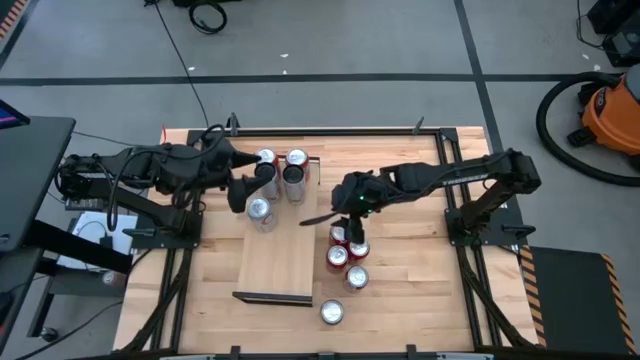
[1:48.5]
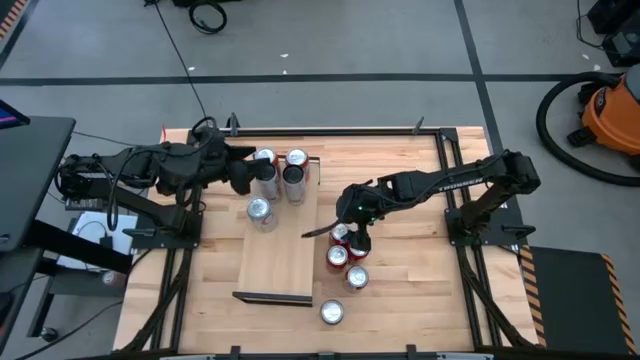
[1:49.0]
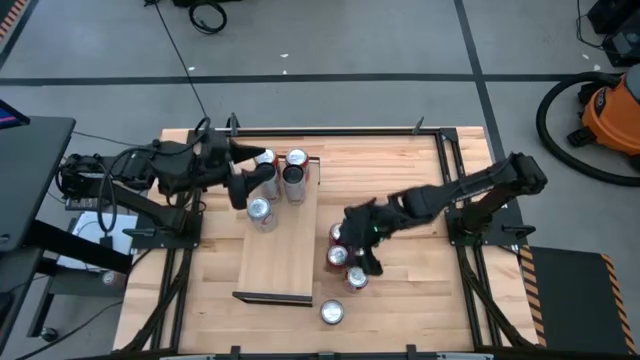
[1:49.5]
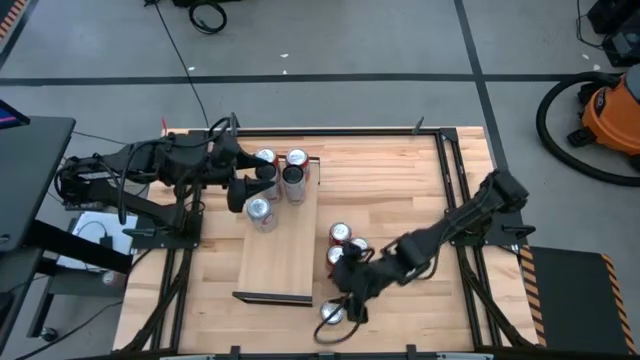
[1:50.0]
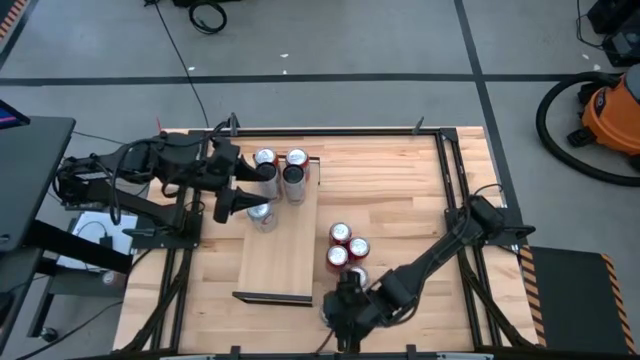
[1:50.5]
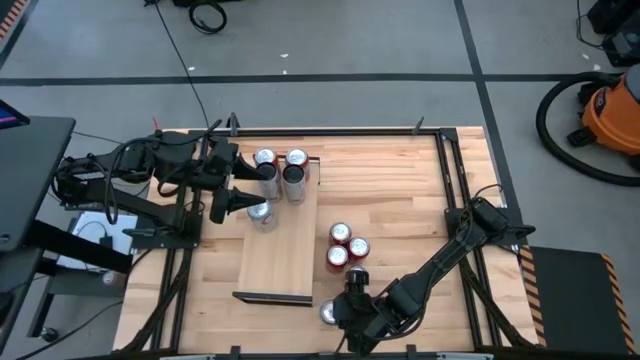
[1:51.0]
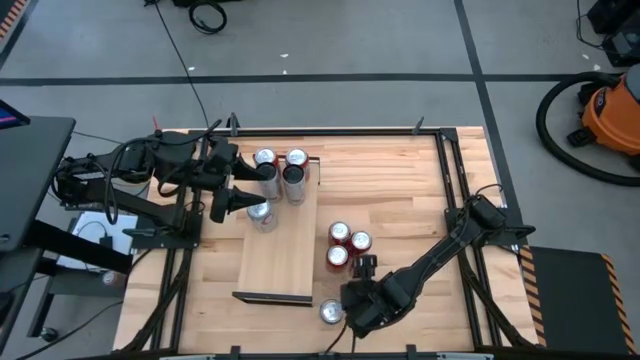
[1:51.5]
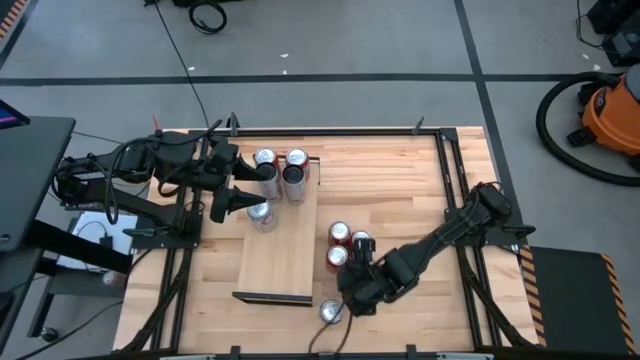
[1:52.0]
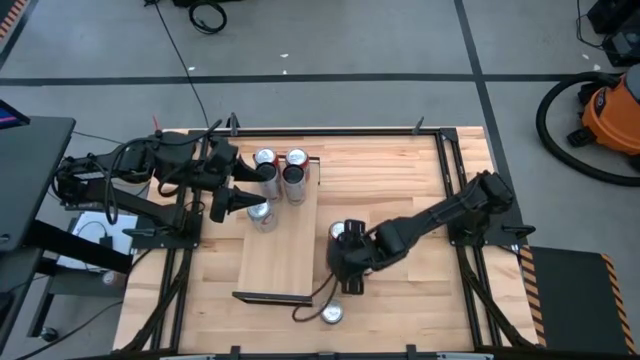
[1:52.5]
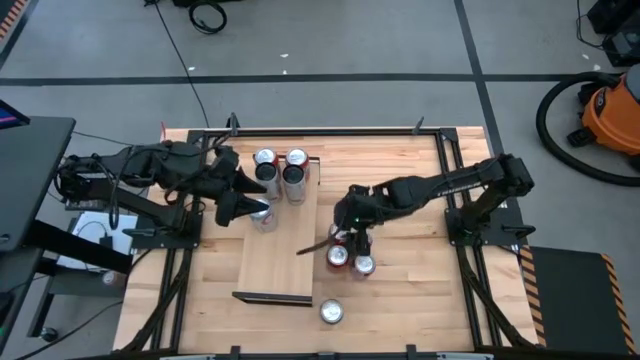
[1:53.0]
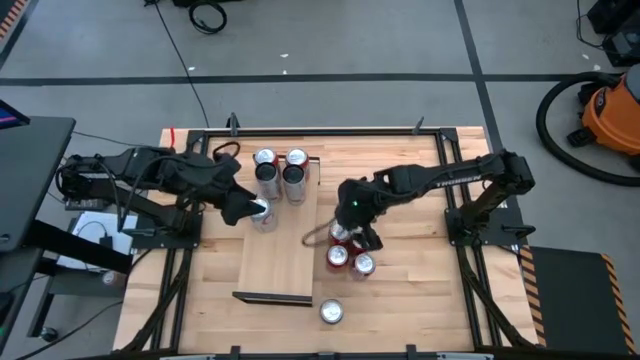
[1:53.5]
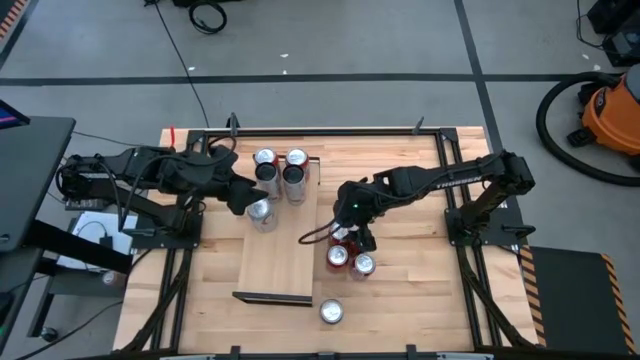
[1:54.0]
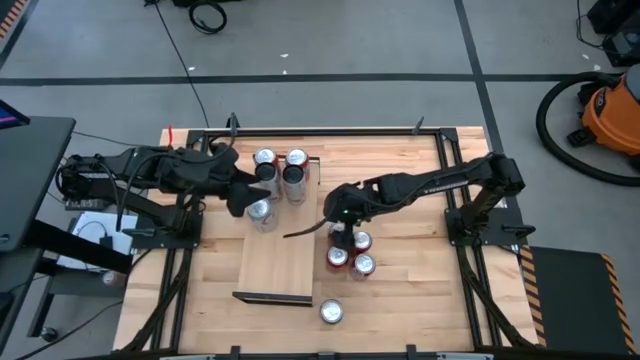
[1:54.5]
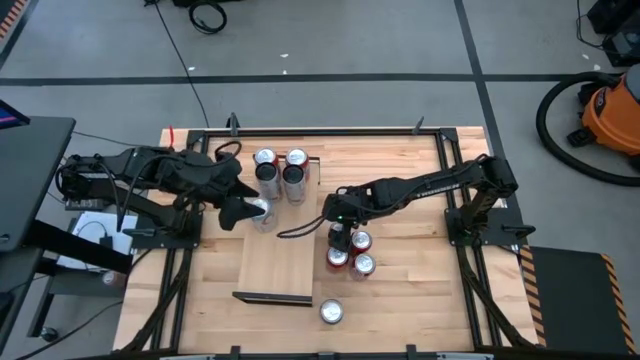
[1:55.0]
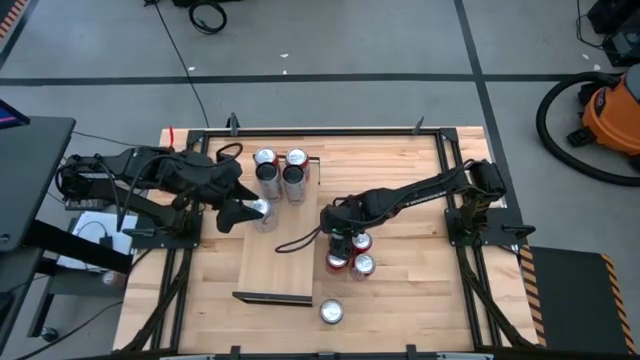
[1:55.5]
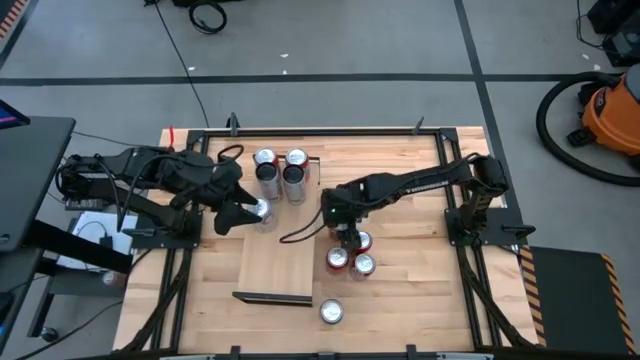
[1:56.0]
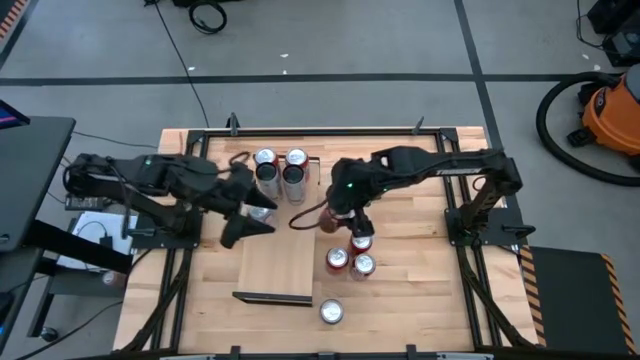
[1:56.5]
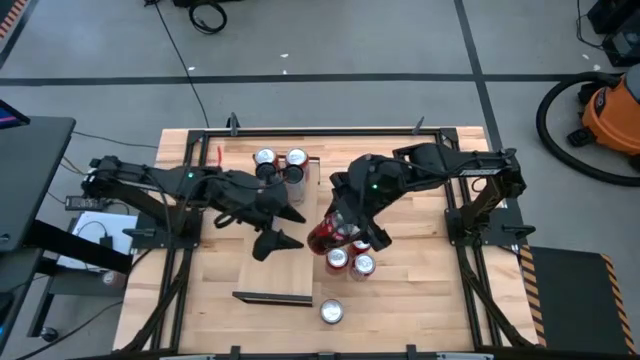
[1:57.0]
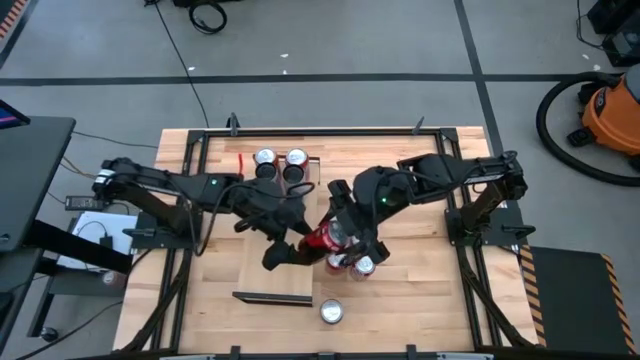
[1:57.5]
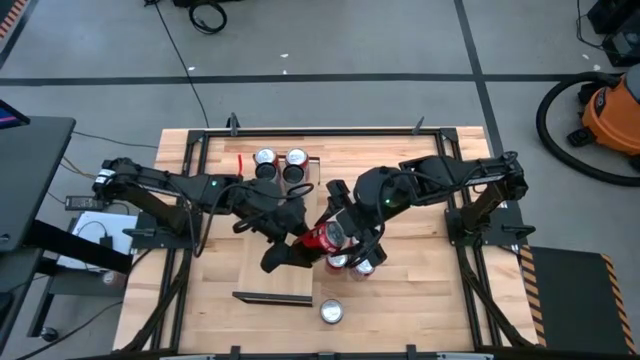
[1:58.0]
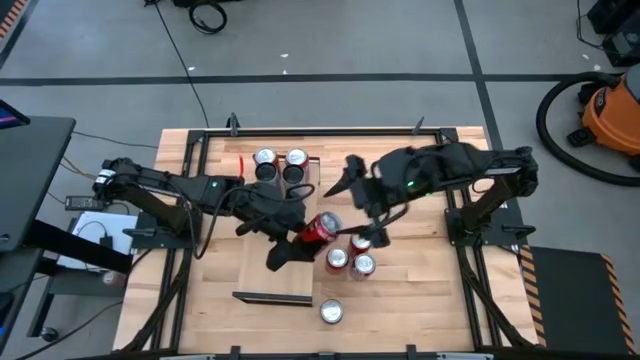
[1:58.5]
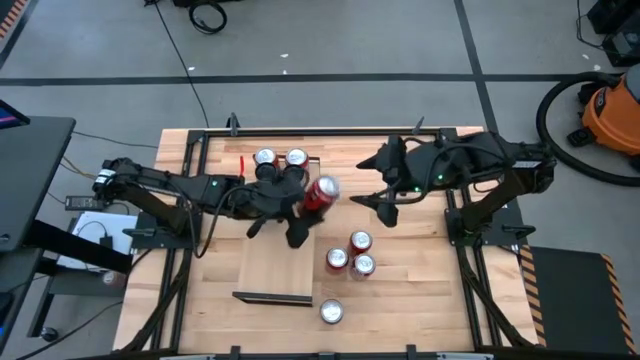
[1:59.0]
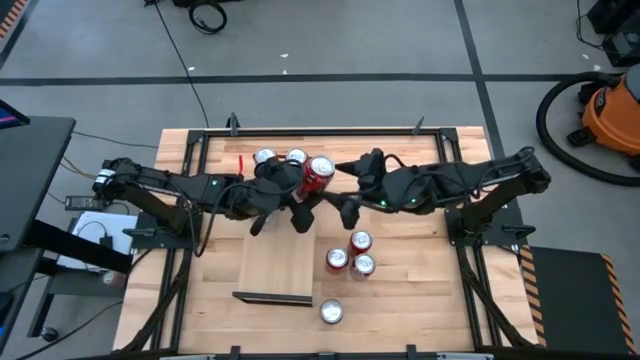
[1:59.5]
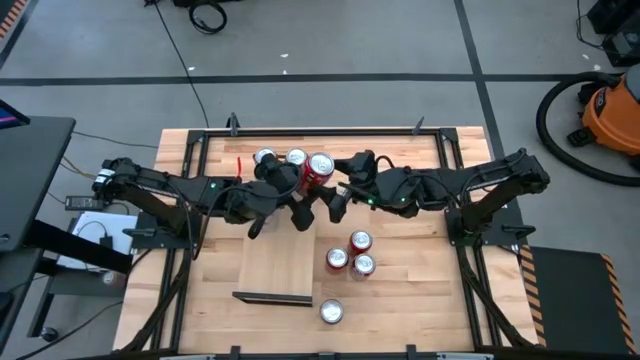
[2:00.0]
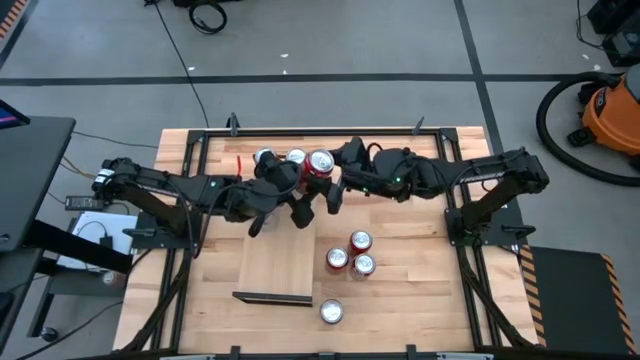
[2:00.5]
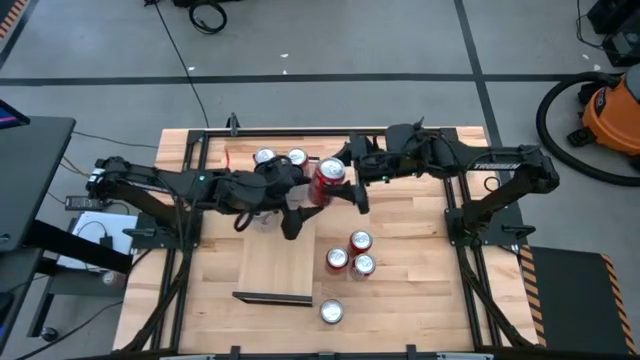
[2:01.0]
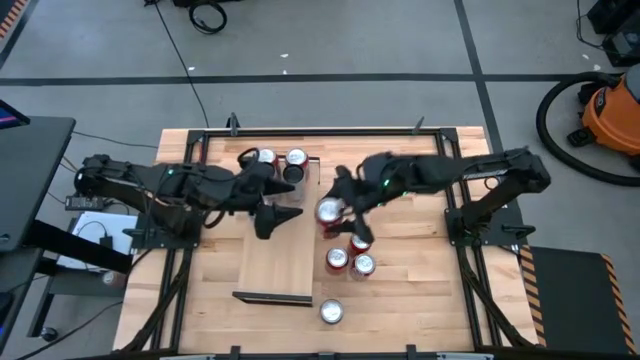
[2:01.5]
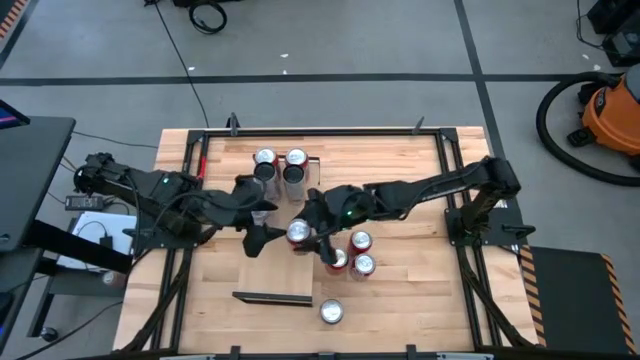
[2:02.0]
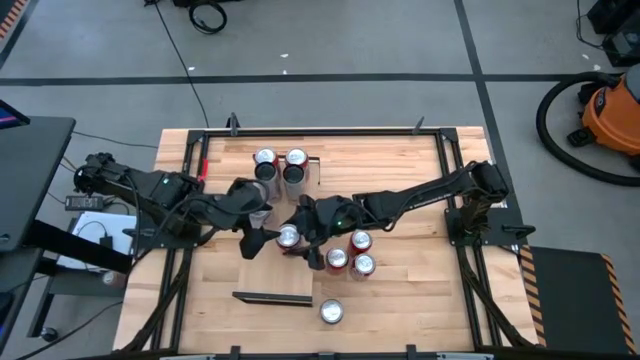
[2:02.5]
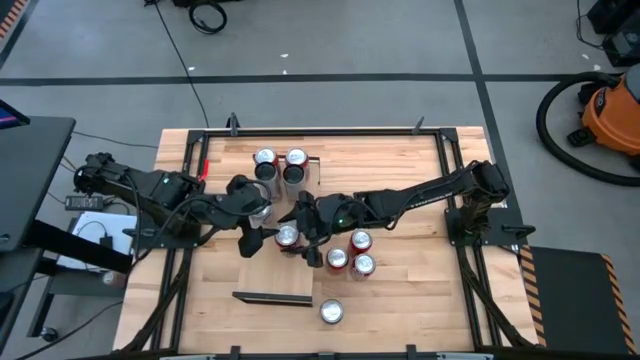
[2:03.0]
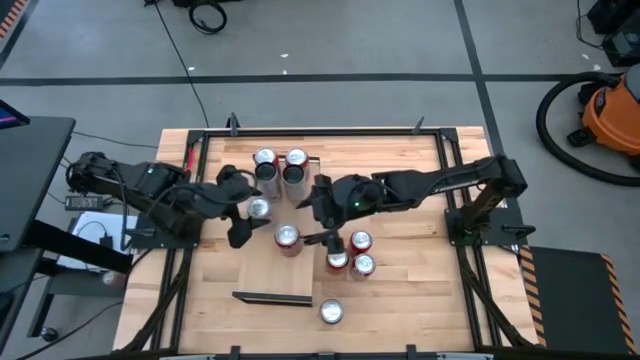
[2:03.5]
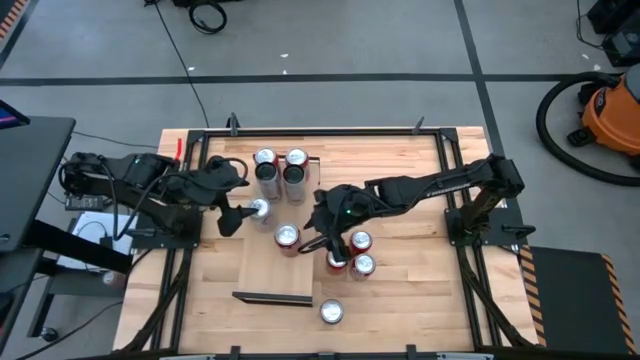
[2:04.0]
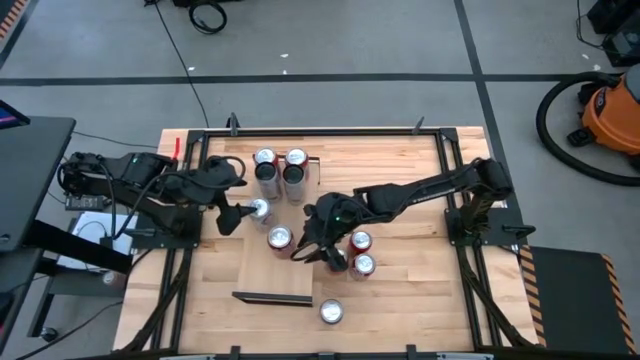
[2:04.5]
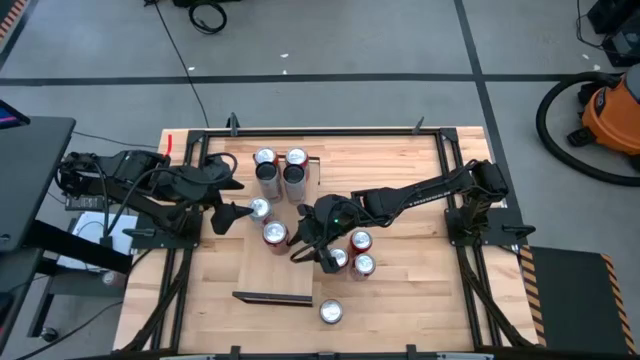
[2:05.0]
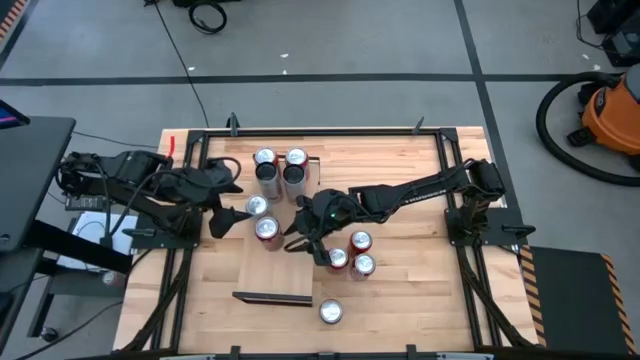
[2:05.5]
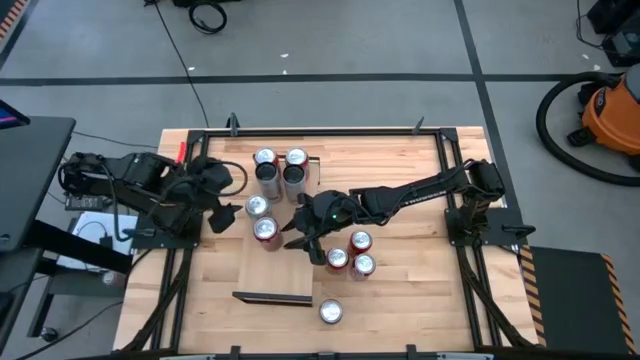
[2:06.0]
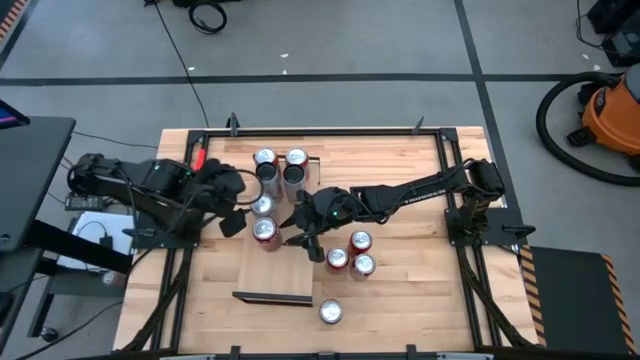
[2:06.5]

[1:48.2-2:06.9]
Task: Place canned beverage on shelf
Put the top left red and white soda can on the shelf

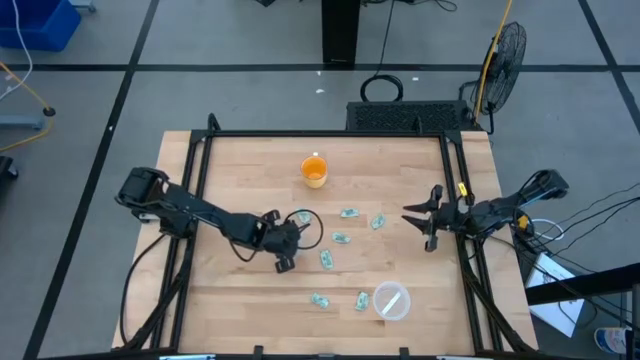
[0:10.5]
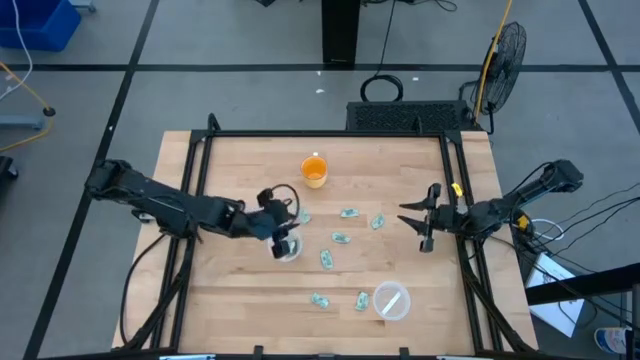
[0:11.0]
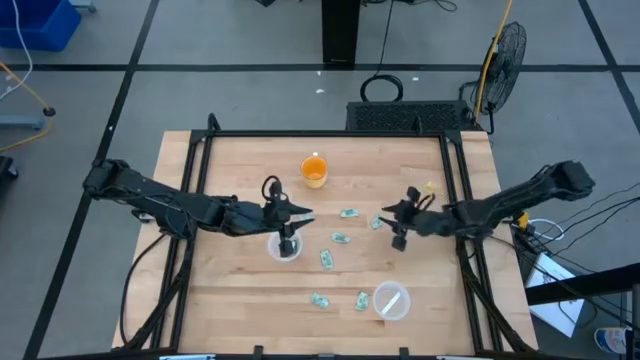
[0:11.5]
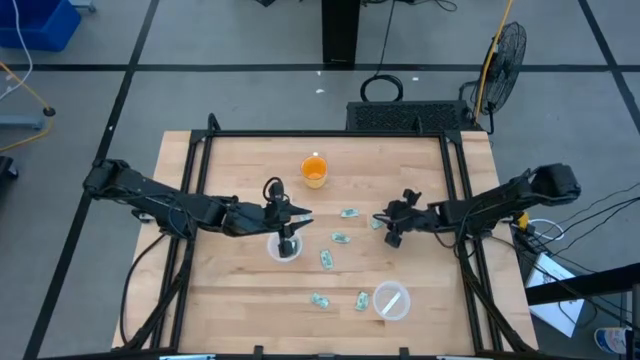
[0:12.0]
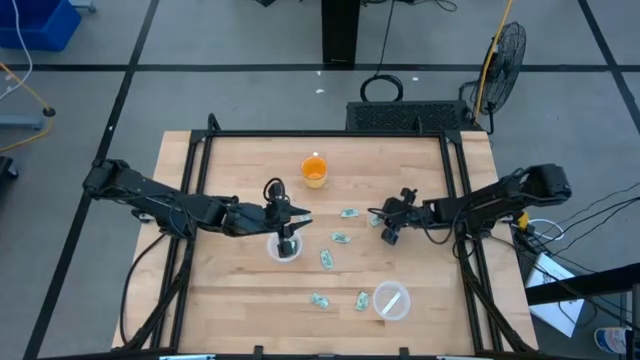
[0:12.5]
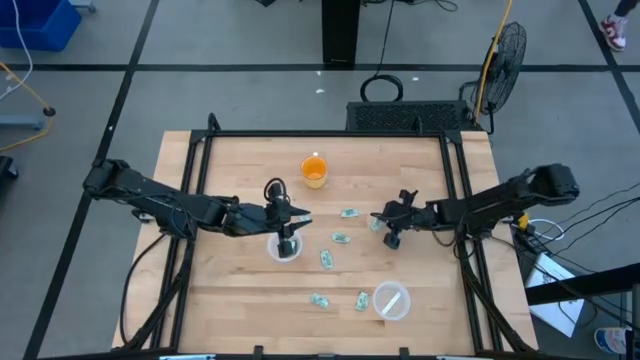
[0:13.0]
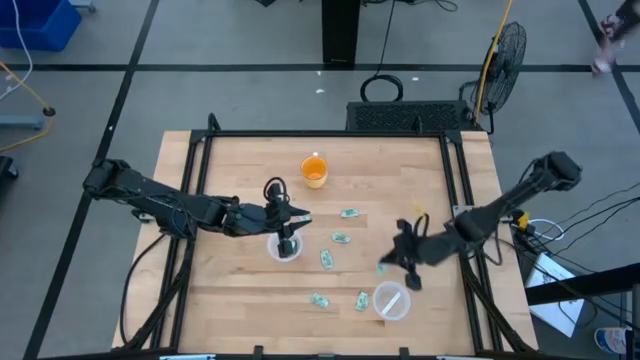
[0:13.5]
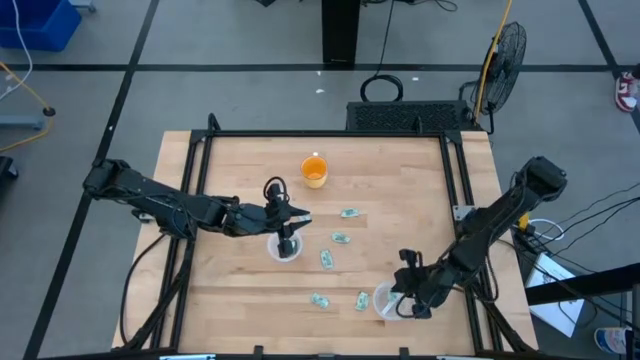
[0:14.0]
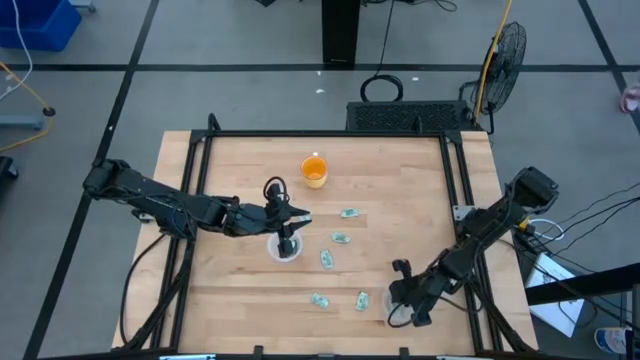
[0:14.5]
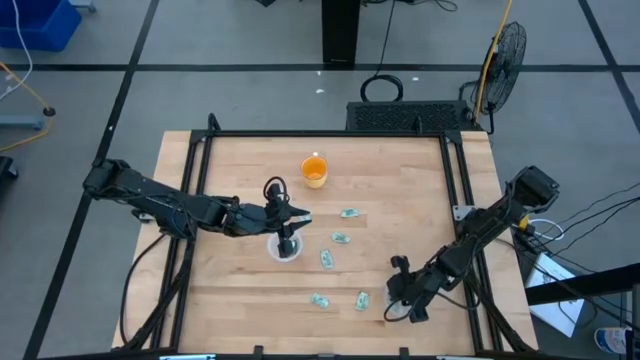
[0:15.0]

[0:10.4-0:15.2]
Task: Pick and place Stevia / Truvia into bins
Put the white stevia packet into the bottom transparent container
